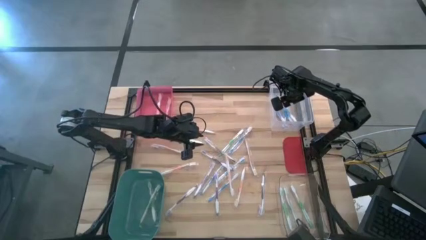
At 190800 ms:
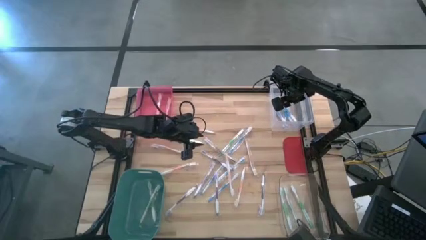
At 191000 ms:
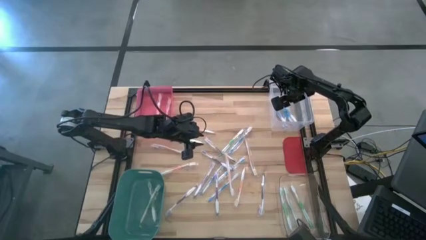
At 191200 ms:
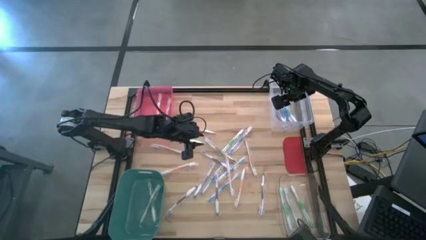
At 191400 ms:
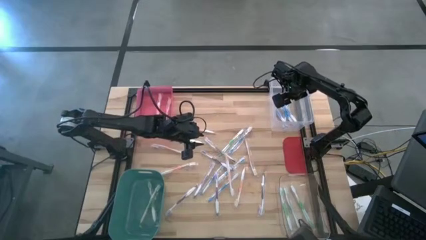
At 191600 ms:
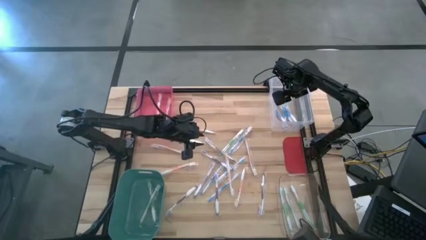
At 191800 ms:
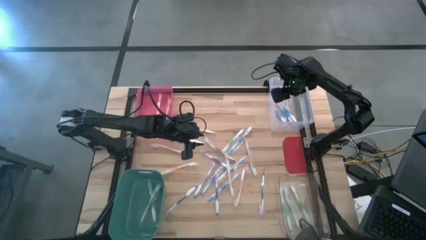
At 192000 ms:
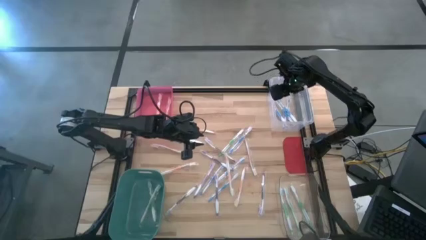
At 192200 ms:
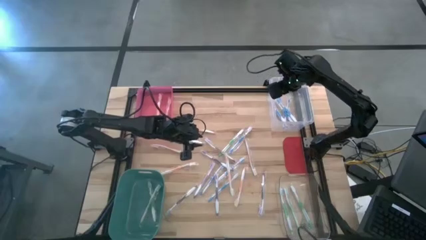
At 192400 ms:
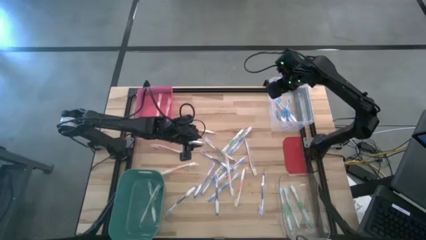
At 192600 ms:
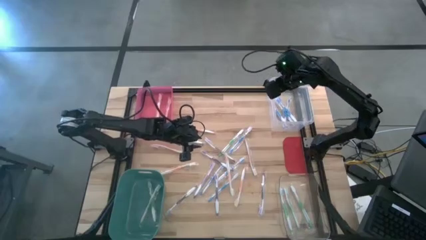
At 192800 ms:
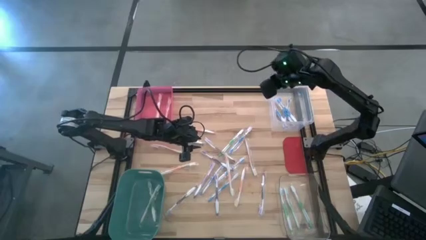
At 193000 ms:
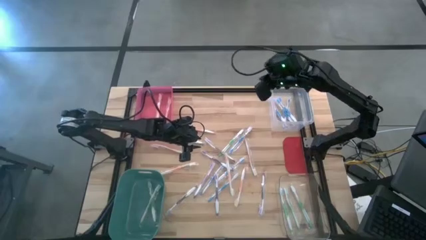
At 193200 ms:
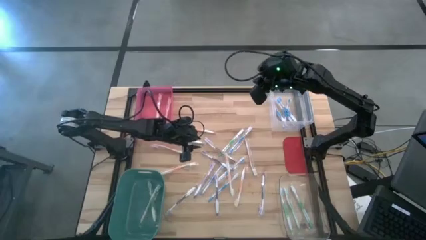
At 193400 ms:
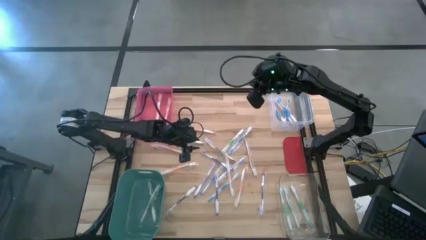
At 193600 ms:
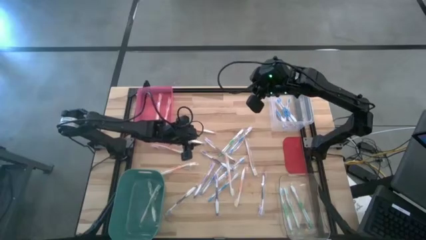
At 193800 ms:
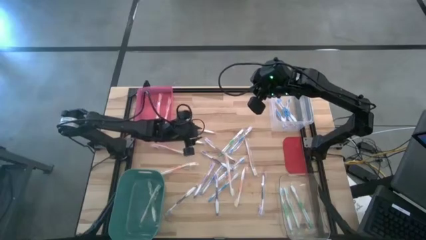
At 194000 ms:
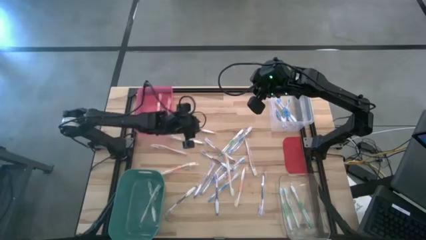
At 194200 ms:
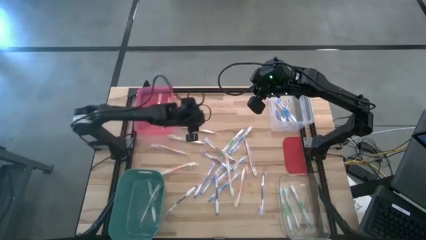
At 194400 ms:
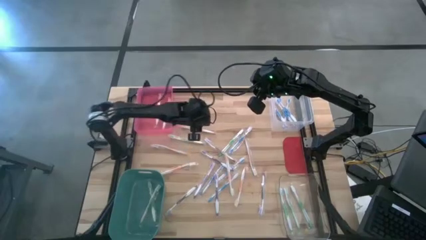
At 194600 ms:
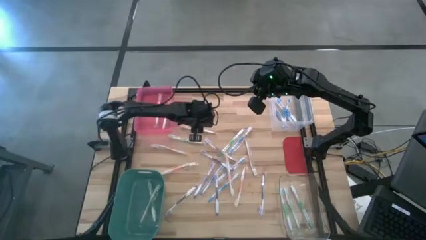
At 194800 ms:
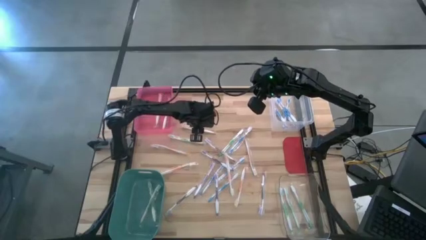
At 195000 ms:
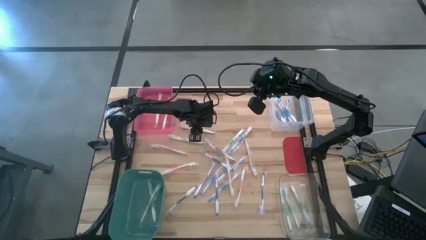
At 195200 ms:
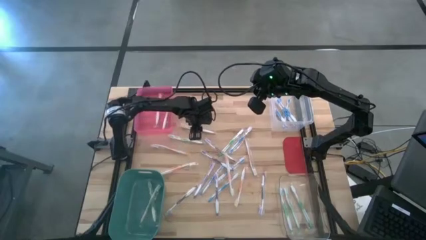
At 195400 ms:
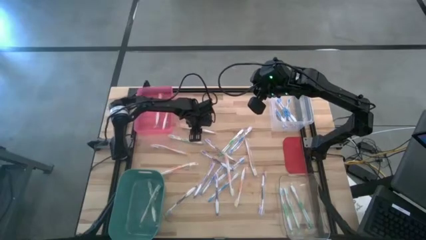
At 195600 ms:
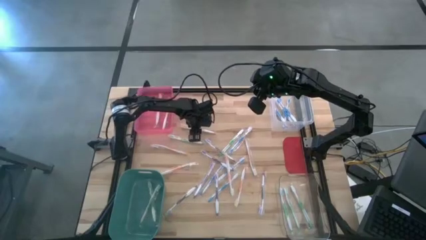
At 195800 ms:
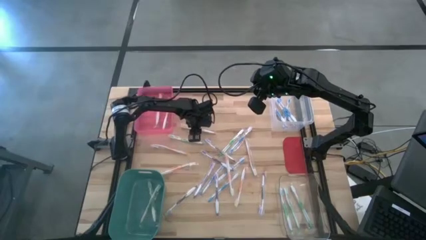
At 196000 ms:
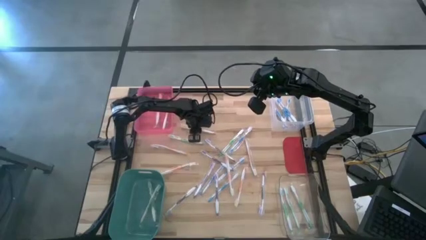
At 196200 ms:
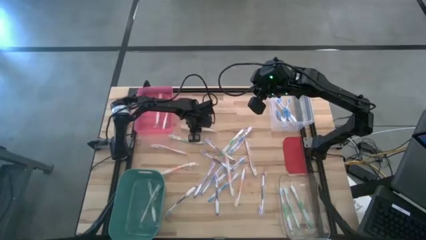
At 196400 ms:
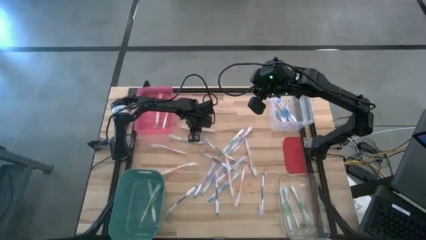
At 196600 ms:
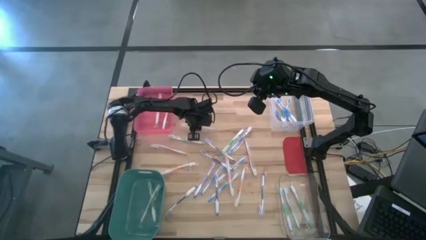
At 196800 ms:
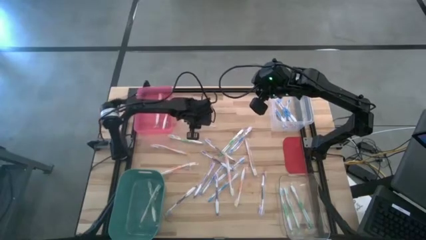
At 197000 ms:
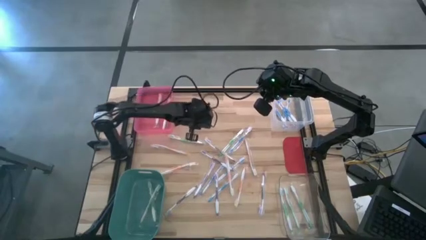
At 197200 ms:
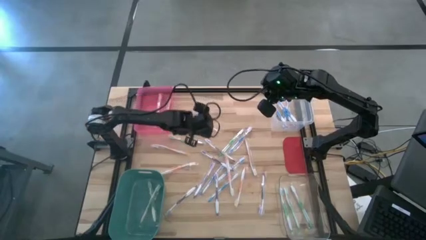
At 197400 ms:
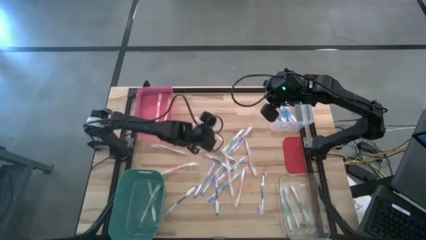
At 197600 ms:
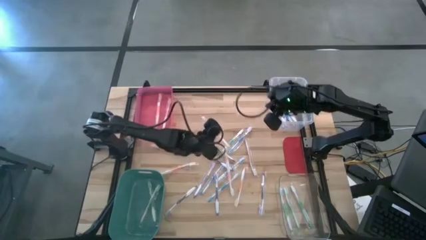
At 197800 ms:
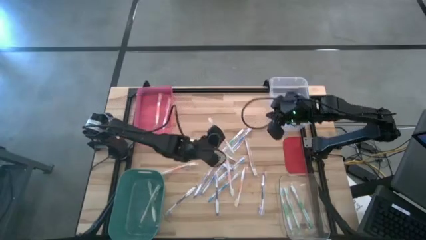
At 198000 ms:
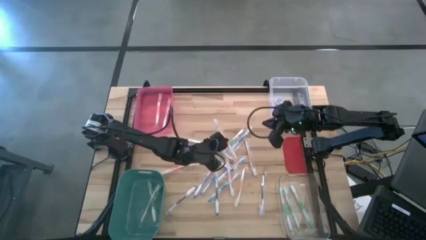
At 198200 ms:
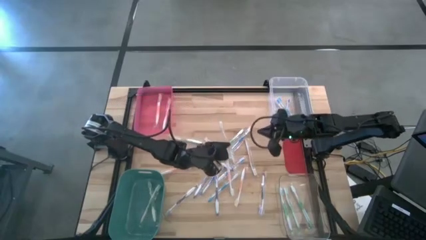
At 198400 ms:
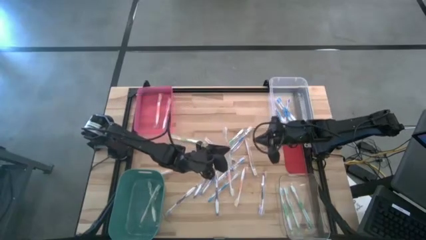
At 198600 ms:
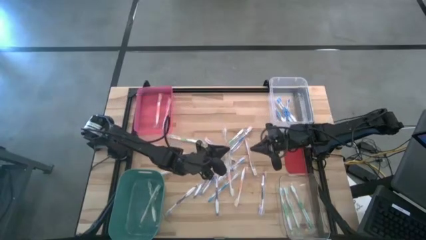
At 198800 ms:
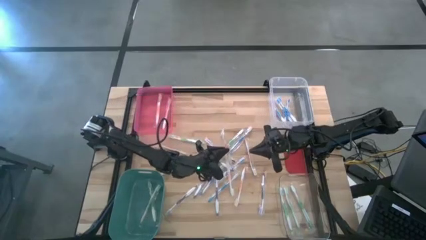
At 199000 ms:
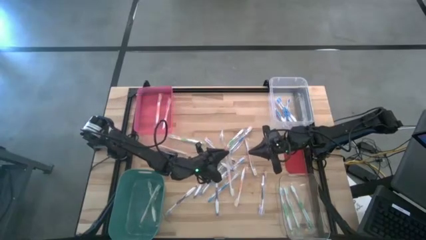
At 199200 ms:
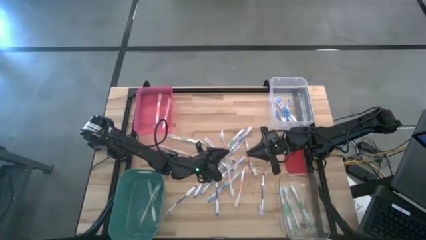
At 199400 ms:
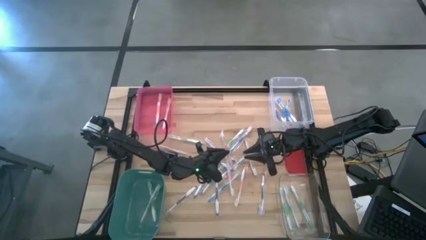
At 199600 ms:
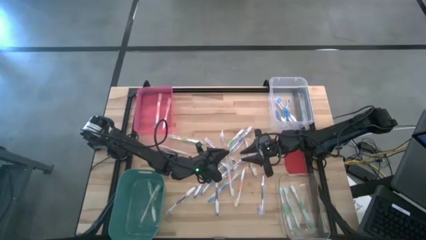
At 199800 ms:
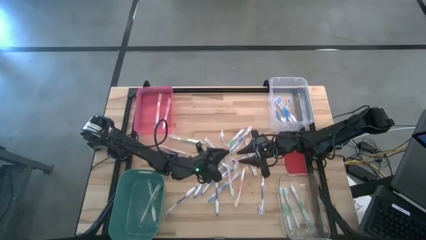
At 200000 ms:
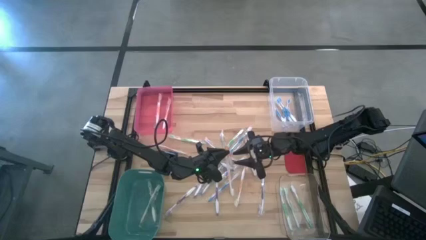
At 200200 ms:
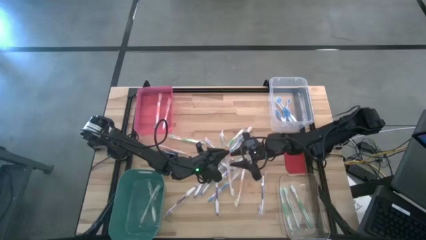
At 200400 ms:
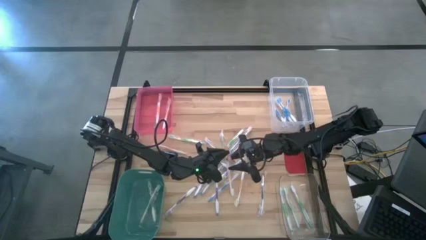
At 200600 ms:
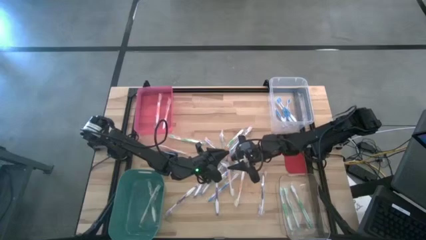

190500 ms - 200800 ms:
Task: Pick & Place Toothbrushes
Put the orange toothbrush into the pink bin

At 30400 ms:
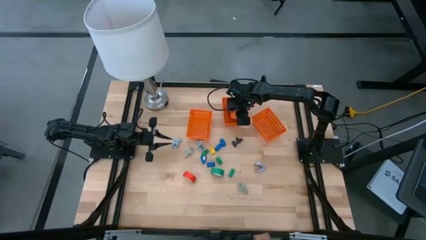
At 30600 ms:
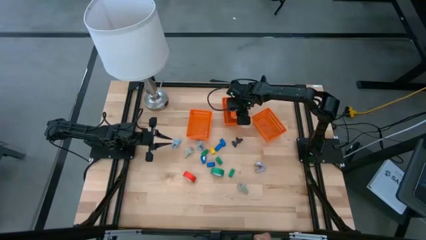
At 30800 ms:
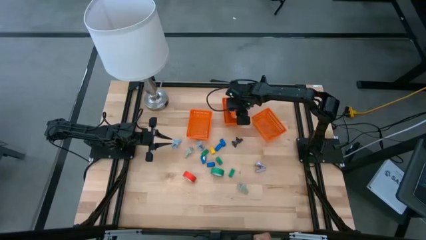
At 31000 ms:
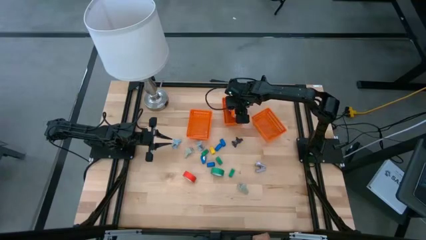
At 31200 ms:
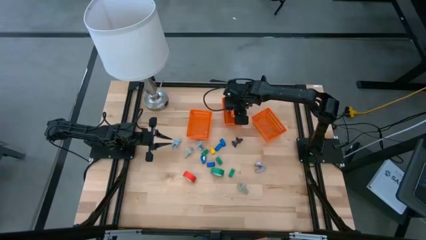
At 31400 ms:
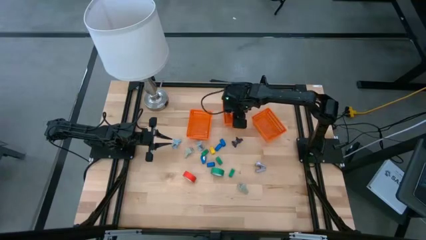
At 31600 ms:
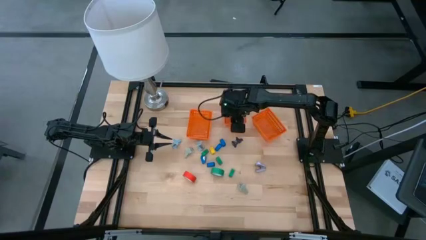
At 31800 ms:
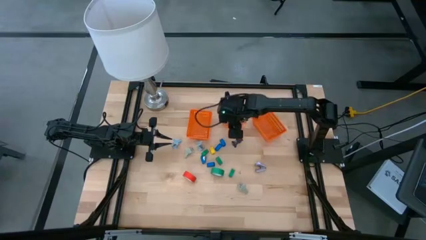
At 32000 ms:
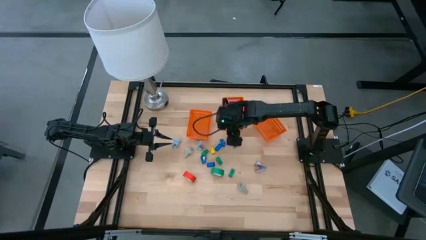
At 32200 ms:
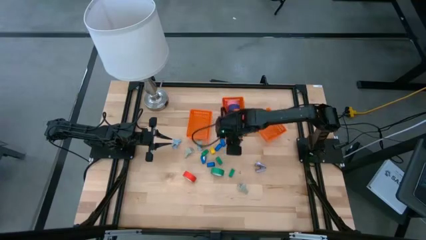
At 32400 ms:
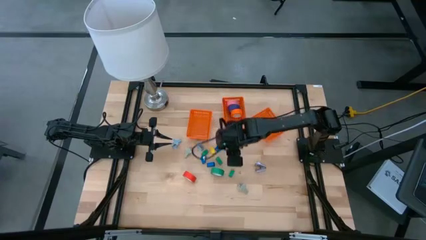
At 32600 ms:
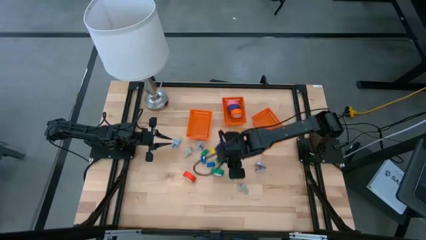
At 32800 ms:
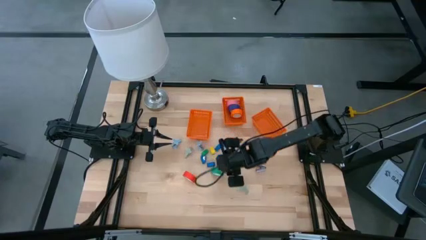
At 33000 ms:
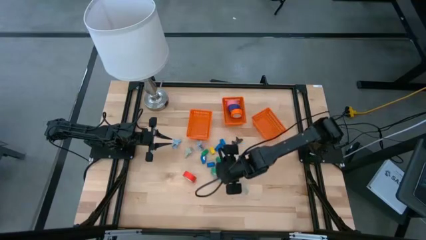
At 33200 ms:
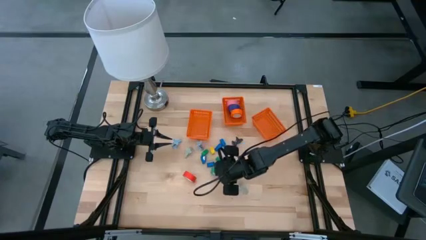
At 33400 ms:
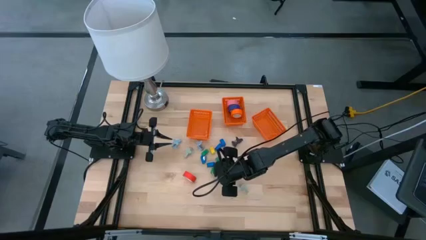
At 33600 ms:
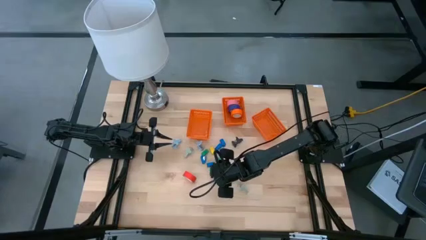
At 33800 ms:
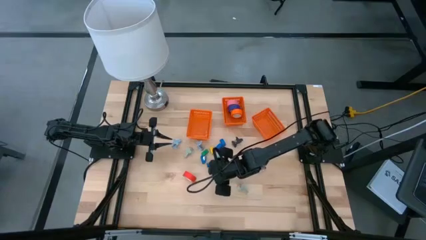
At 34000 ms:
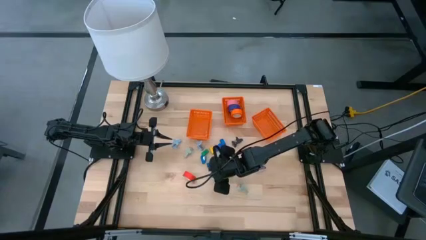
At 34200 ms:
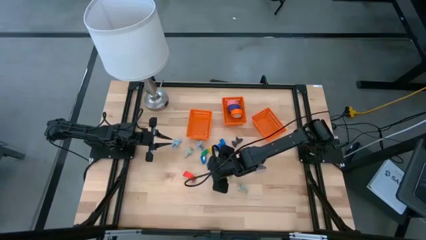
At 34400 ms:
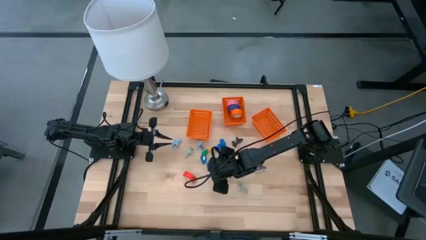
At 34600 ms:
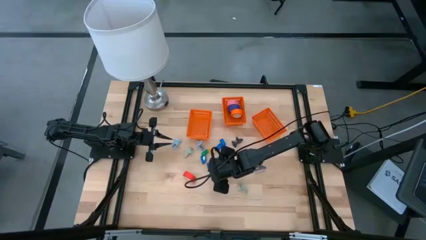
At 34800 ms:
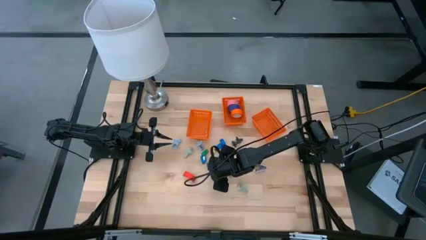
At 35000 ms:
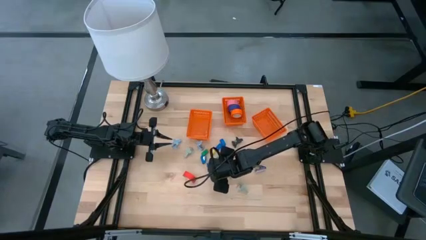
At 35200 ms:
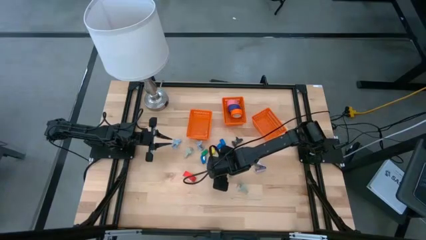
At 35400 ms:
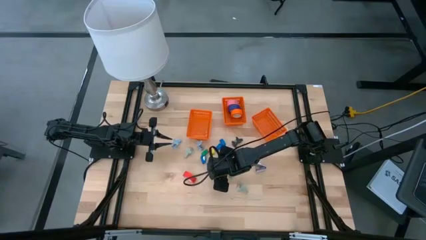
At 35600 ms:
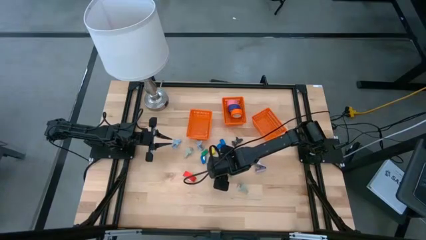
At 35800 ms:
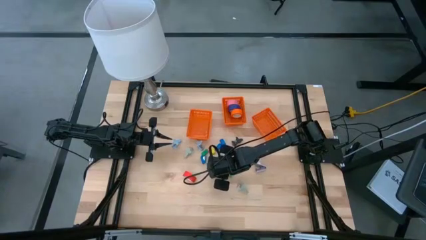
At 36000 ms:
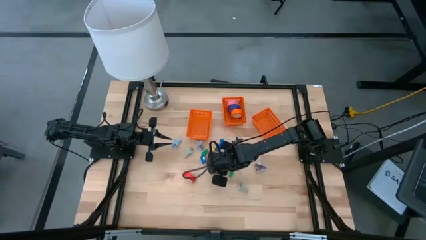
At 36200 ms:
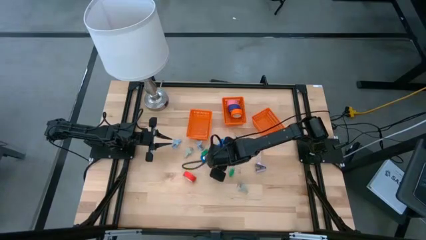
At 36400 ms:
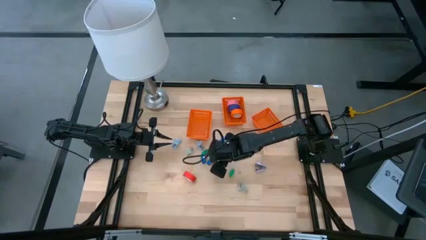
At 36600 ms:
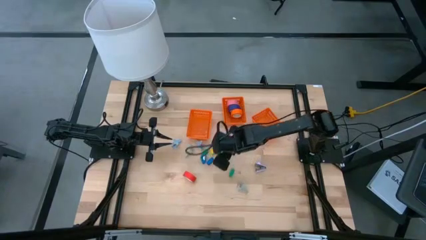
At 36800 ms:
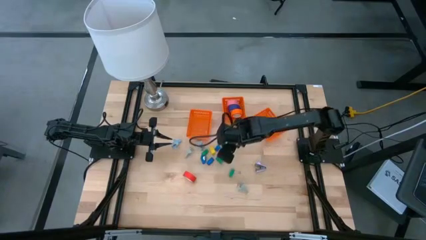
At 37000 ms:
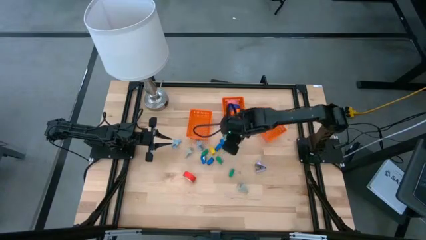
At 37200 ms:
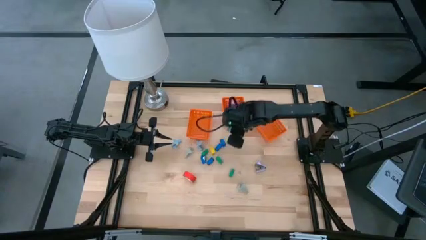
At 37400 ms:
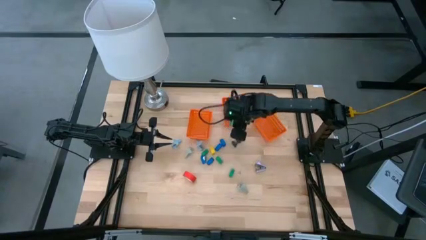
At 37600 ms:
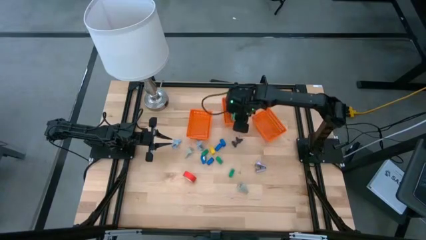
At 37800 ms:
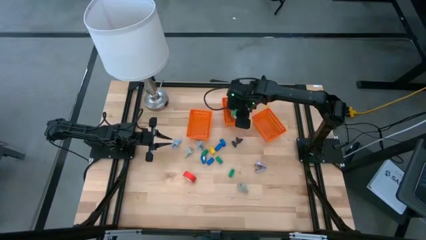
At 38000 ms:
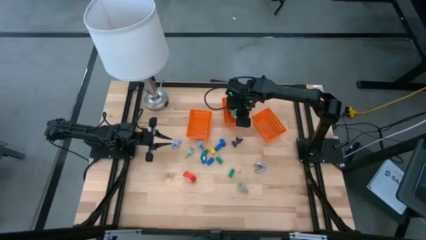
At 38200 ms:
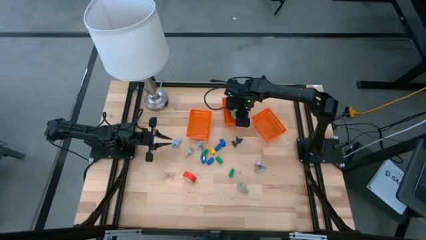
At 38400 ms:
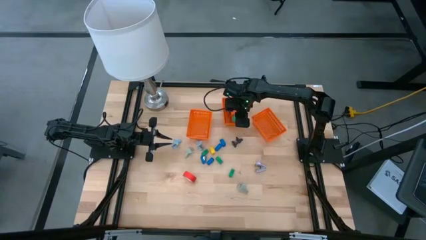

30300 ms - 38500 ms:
Task: Pick and place Stapler, Stapler remover, tape
Put the green adhesive tape into the middle orange bin
